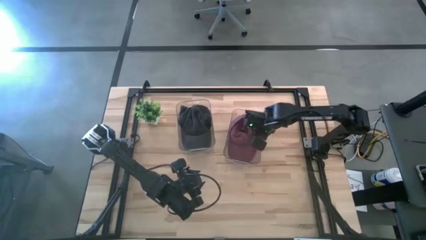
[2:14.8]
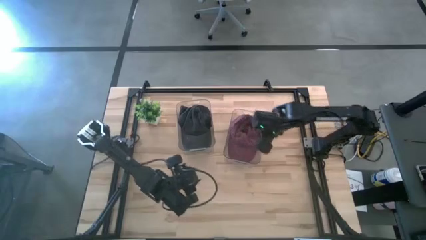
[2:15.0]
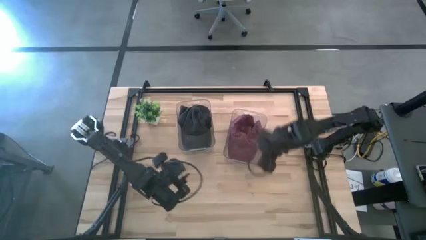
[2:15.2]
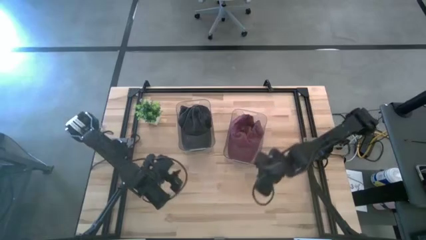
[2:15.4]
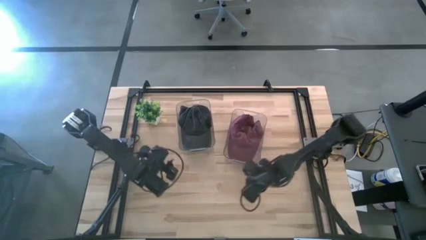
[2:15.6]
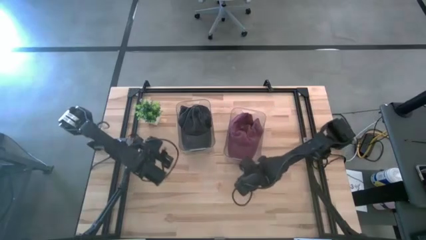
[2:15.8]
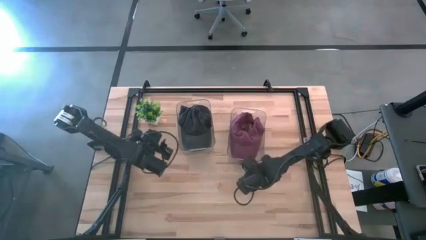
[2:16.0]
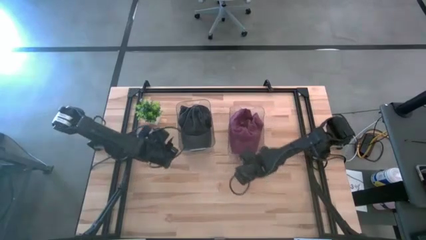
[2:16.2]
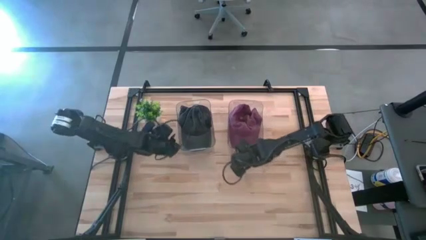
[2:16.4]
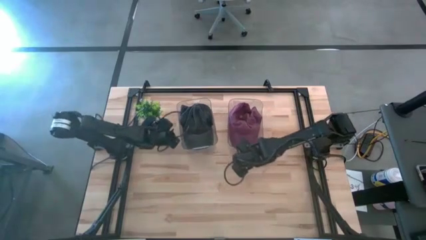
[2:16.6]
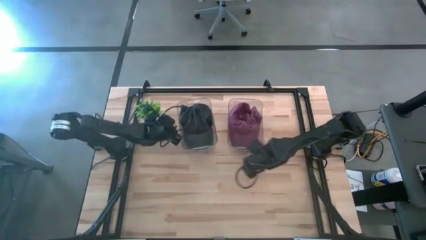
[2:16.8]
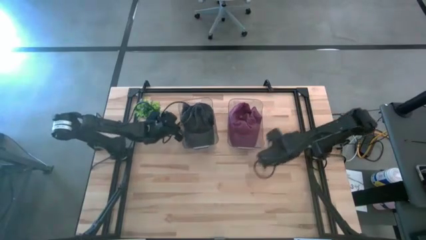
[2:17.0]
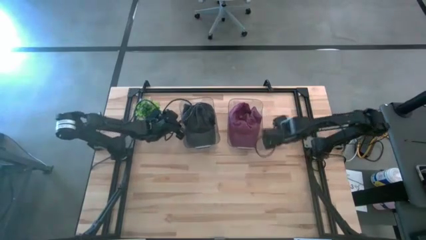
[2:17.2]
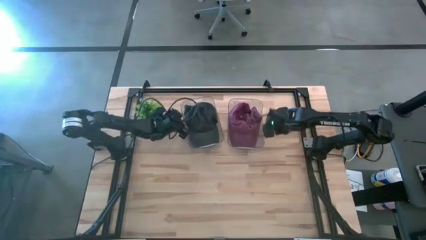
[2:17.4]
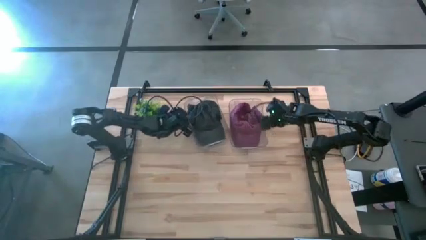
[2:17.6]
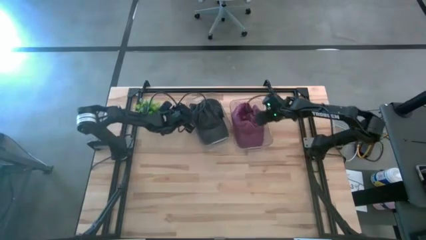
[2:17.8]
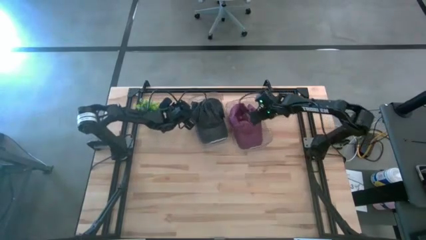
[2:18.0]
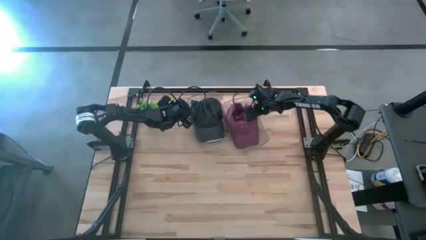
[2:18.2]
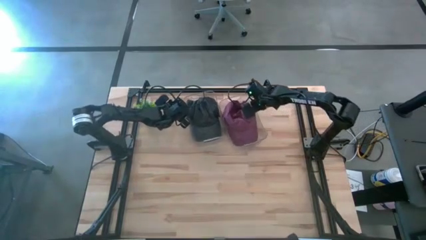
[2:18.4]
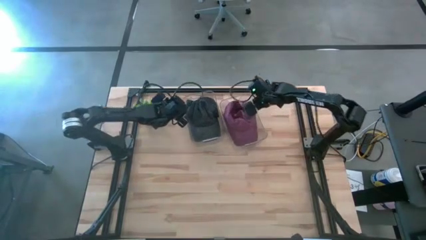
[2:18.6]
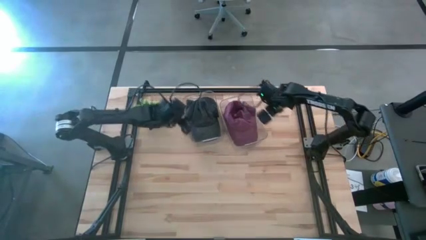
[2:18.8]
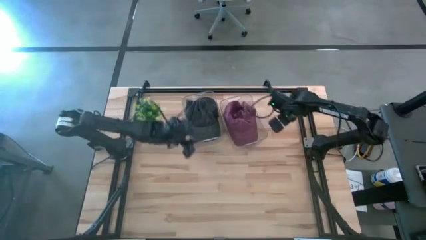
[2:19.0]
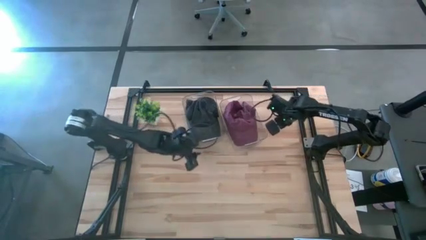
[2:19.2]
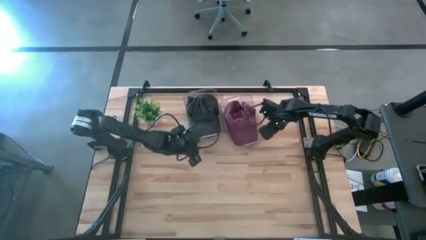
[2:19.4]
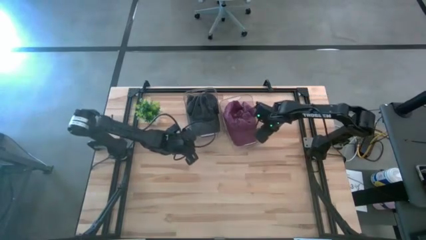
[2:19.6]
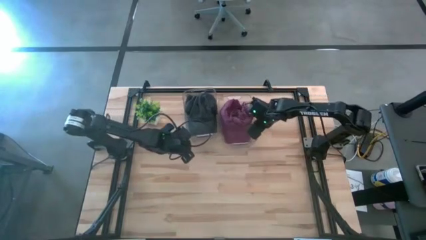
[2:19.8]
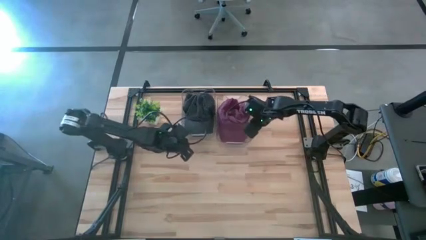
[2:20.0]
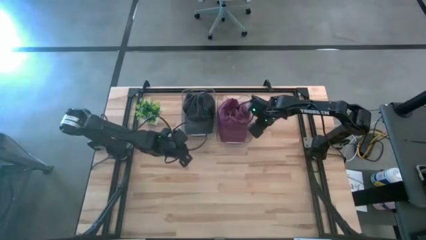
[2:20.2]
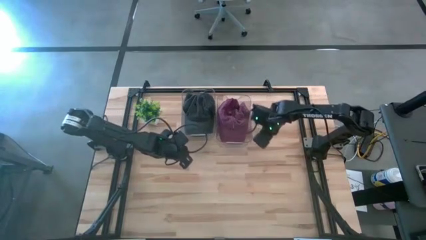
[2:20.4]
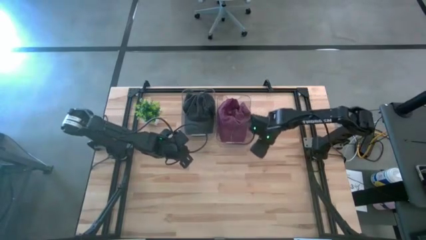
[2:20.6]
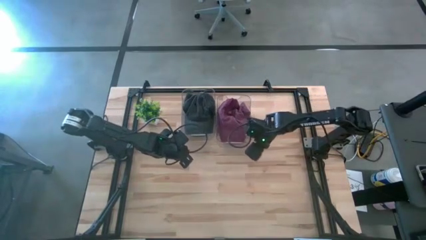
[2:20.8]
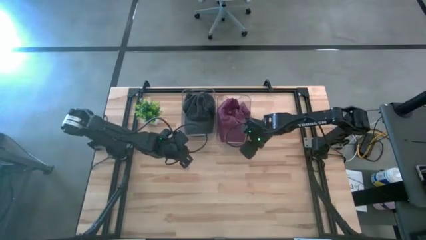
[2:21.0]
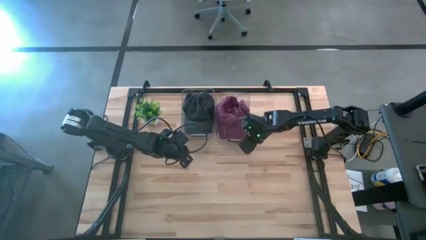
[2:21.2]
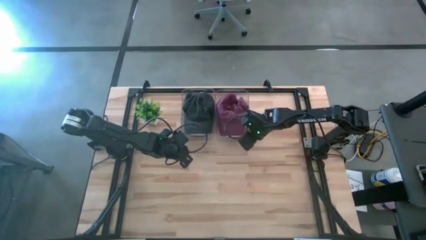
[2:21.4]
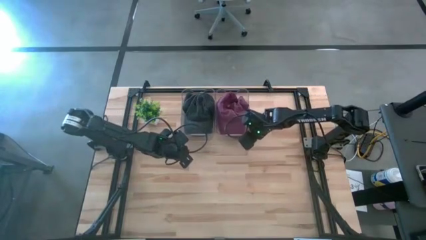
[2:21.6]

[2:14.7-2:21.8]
Task: Pick & Place hat
Adjust the transparent bins on the table

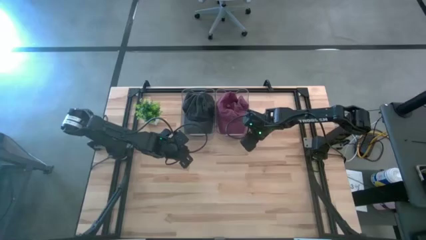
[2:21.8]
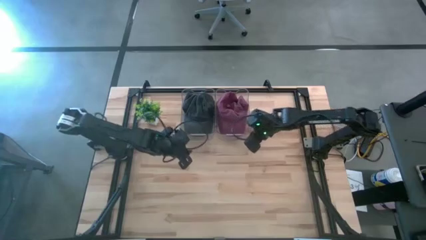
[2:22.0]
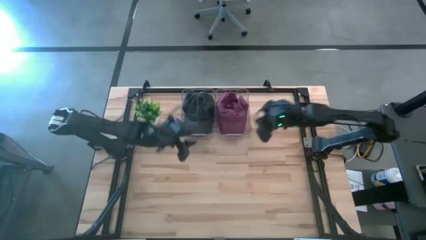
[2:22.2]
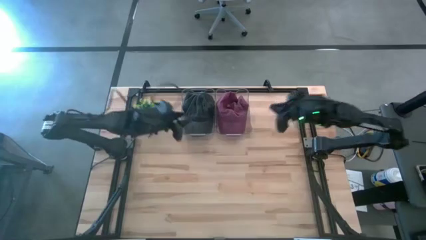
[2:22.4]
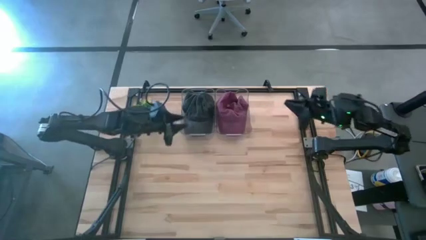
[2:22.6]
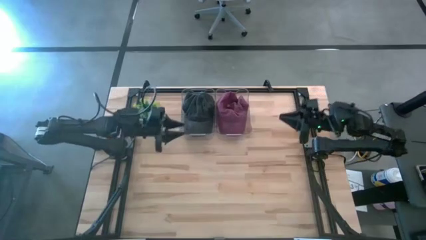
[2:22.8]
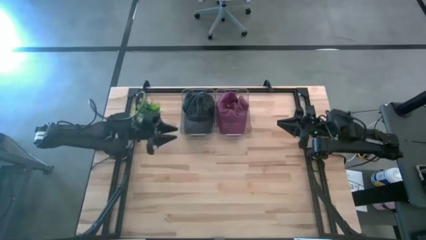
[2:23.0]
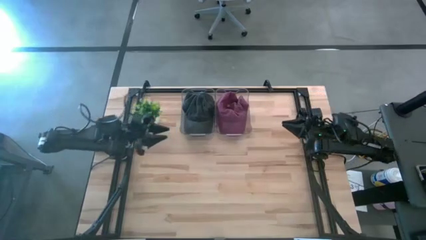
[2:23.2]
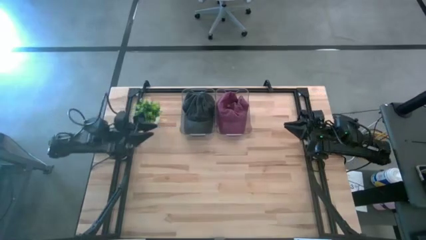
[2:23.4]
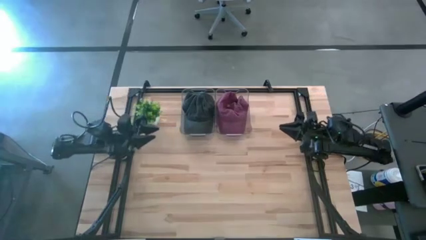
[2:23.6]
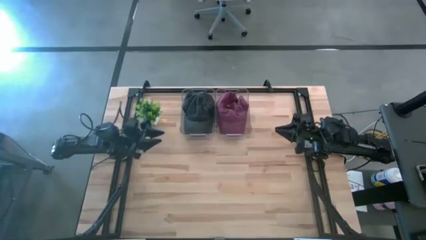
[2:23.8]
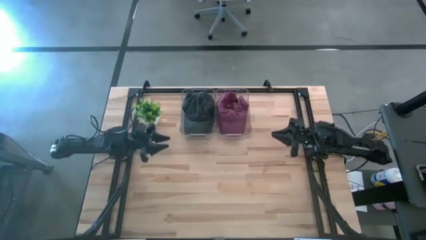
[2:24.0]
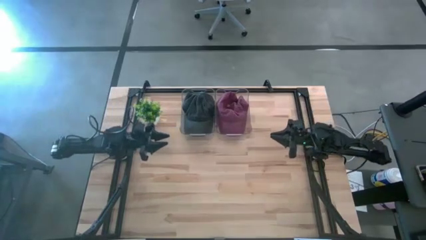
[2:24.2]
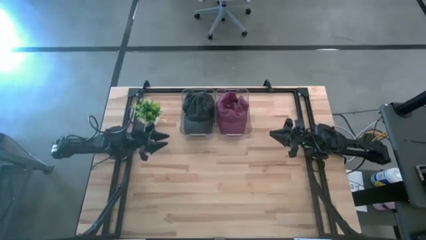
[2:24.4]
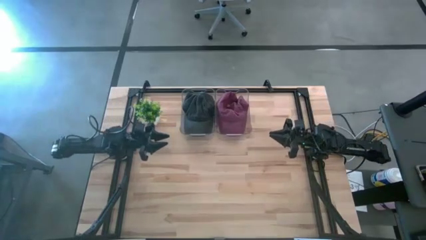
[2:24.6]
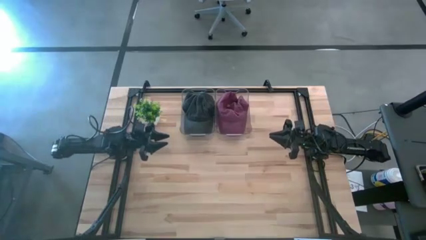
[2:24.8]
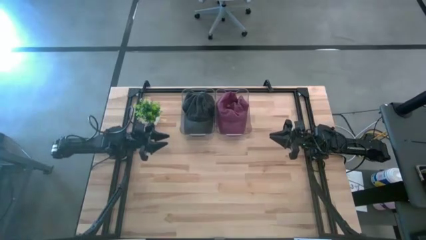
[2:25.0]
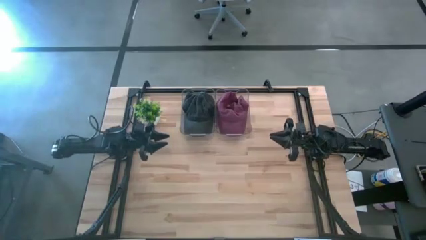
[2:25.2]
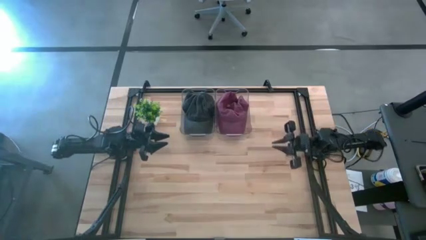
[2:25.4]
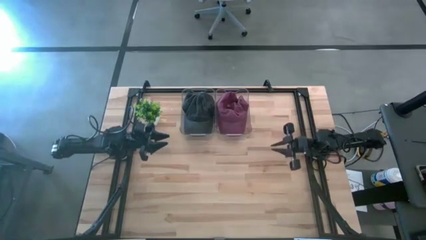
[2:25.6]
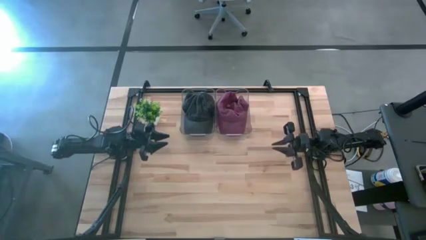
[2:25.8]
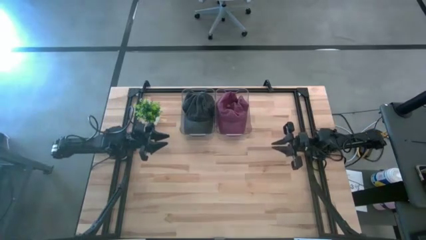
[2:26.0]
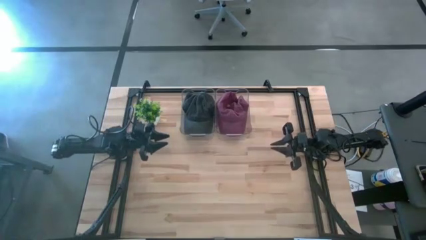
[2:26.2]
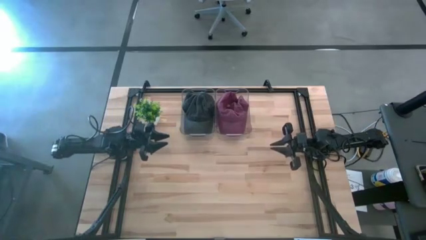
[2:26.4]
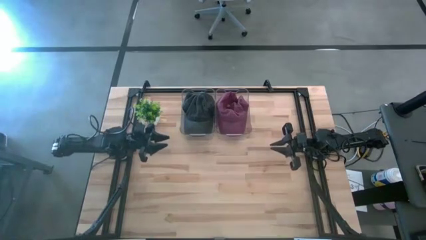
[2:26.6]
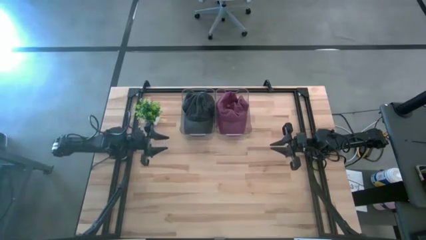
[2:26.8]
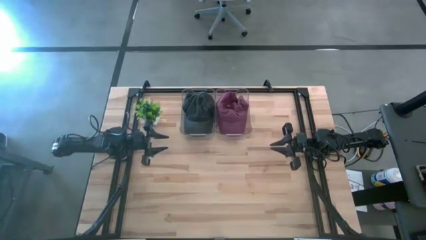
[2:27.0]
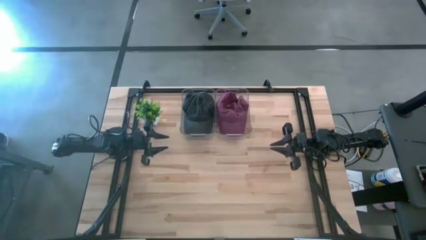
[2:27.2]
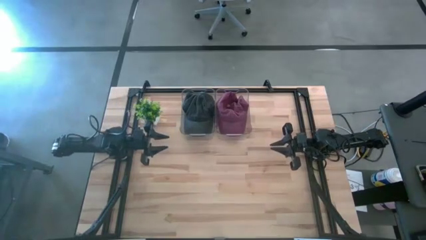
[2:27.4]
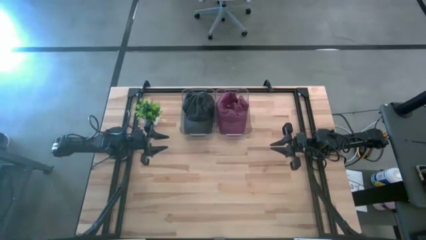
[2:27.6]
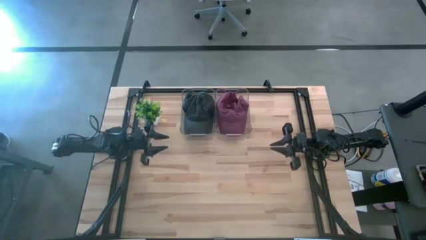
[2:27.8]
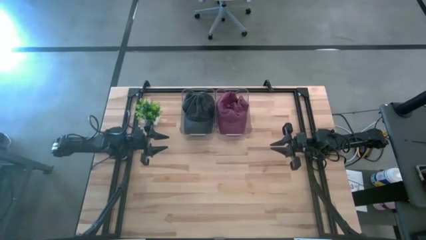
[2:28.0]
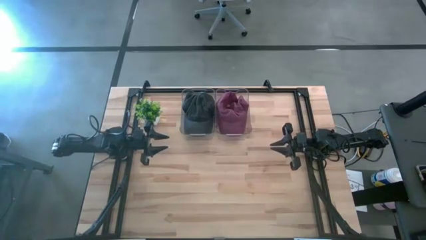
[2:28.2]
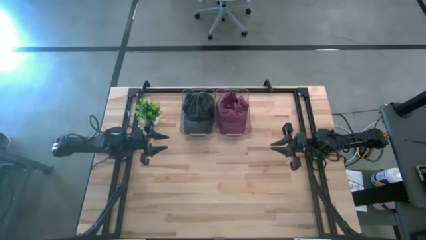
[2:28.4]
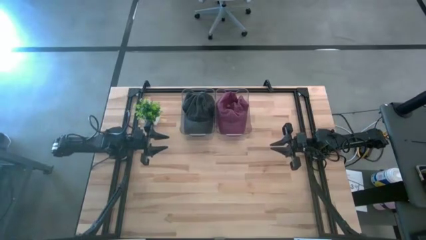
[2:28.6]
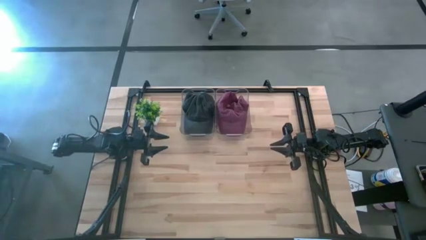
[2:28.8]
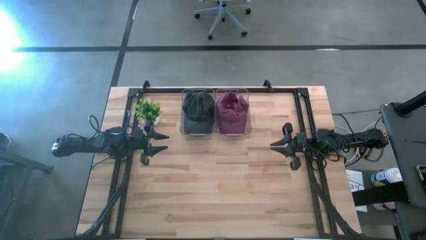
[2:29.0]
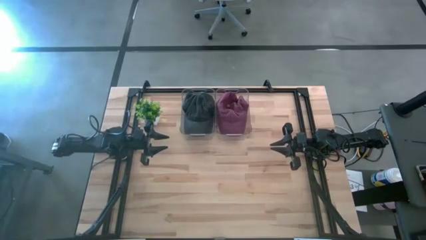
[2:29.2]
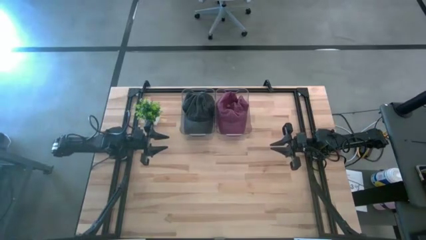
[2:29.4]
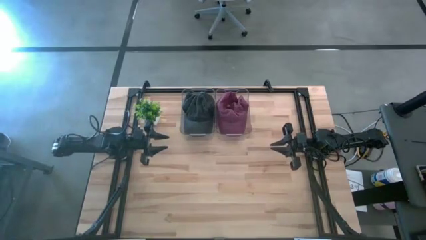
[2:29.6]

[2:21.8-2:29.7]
Return to Home Position
